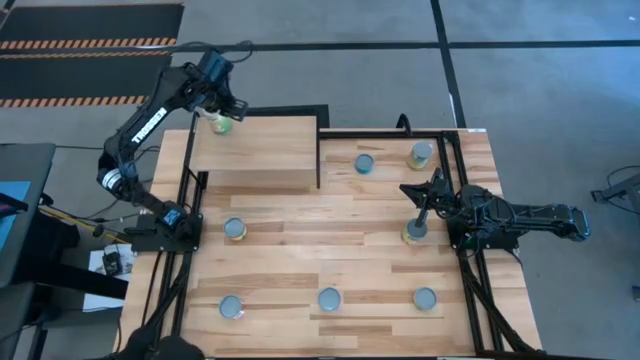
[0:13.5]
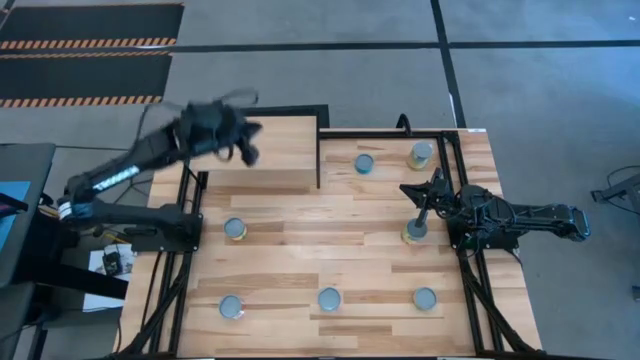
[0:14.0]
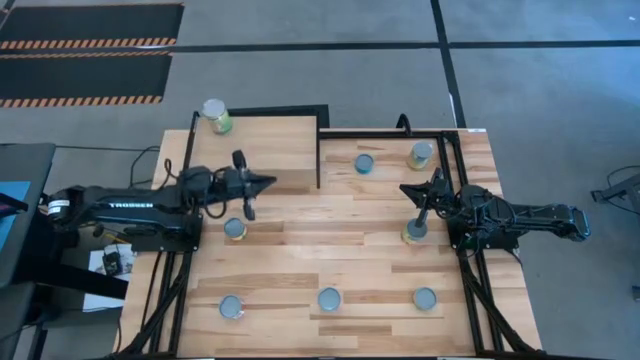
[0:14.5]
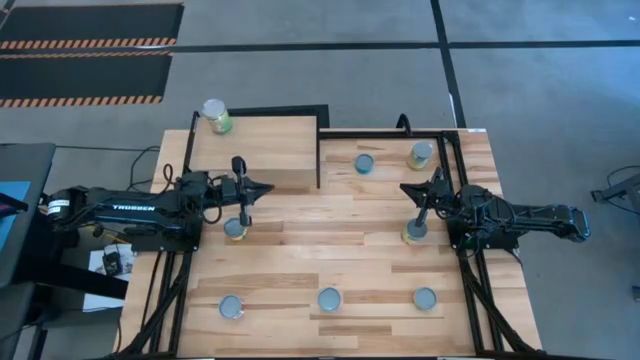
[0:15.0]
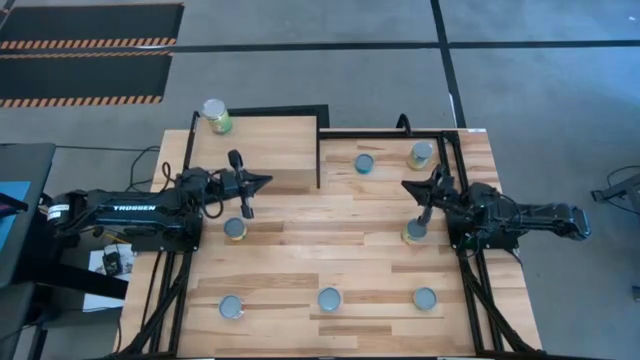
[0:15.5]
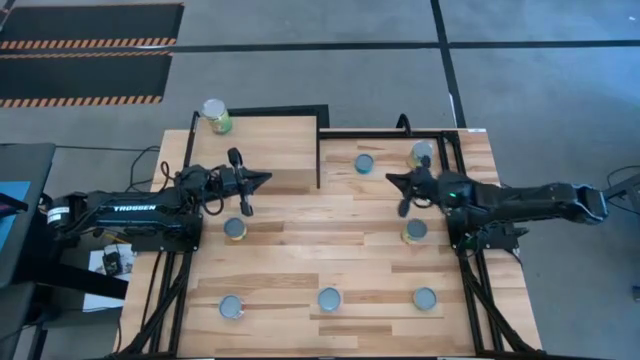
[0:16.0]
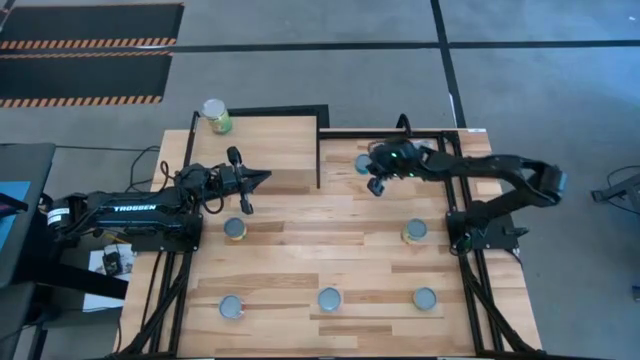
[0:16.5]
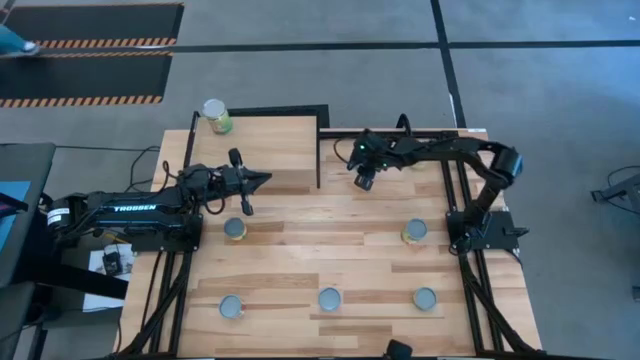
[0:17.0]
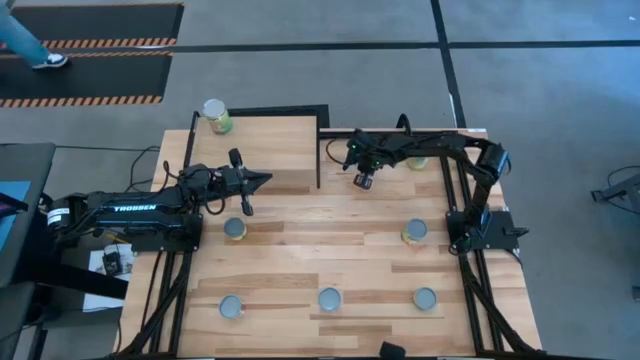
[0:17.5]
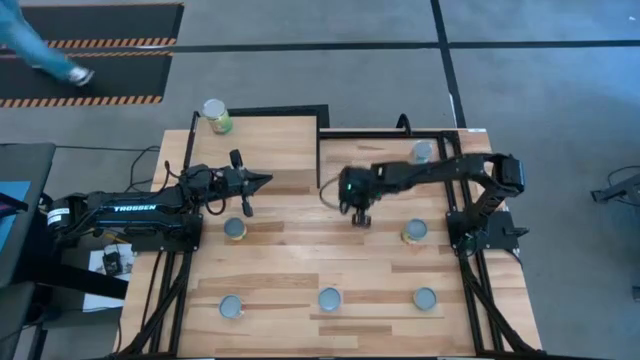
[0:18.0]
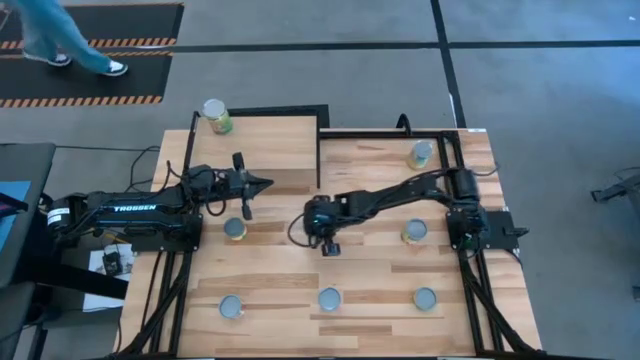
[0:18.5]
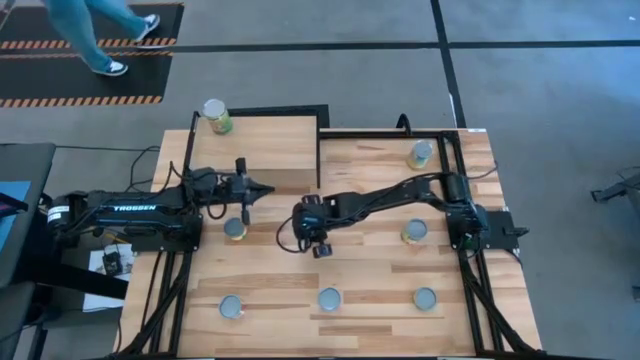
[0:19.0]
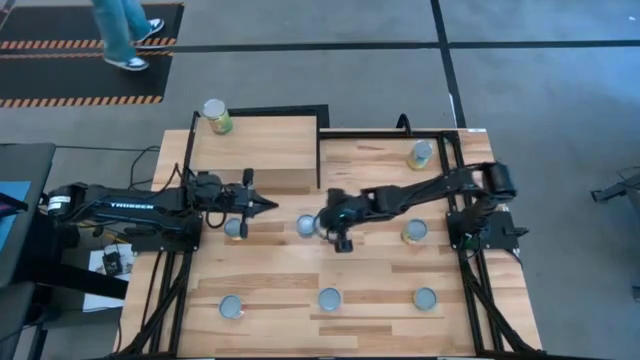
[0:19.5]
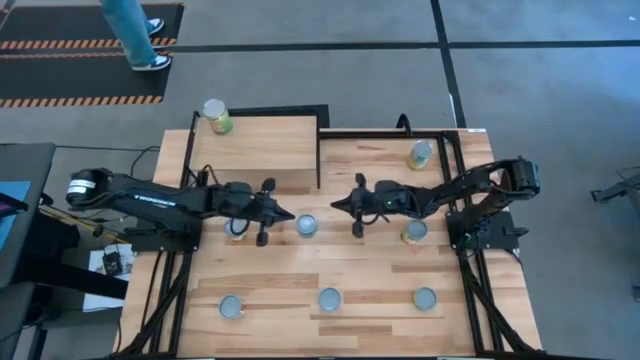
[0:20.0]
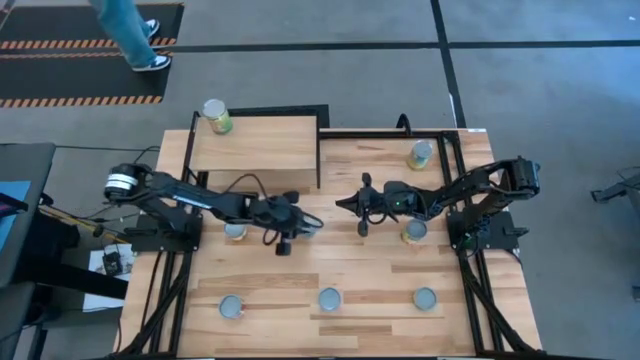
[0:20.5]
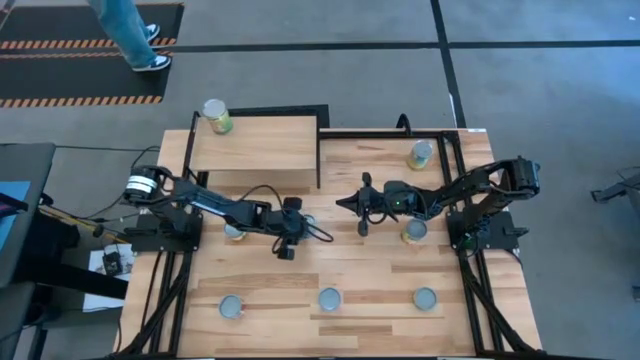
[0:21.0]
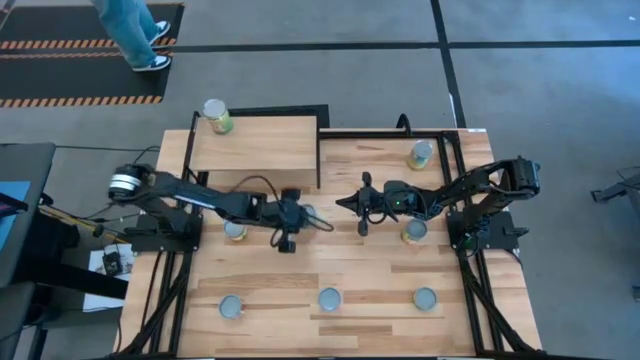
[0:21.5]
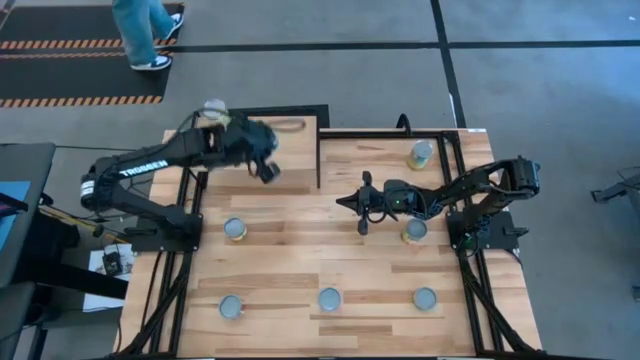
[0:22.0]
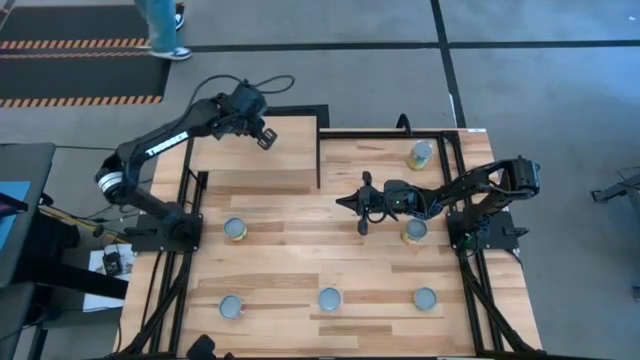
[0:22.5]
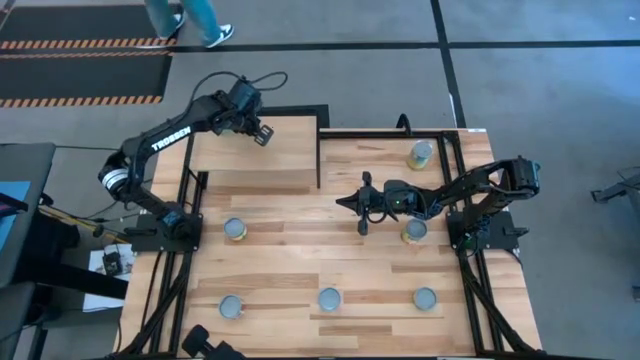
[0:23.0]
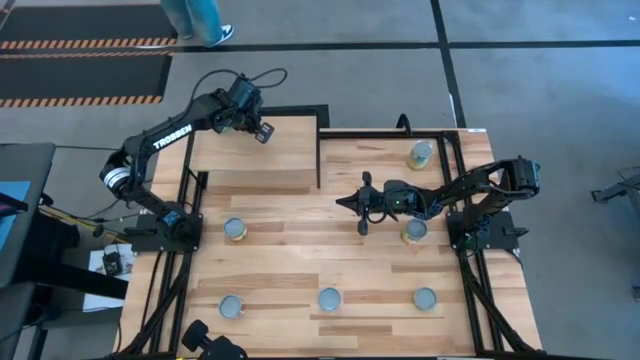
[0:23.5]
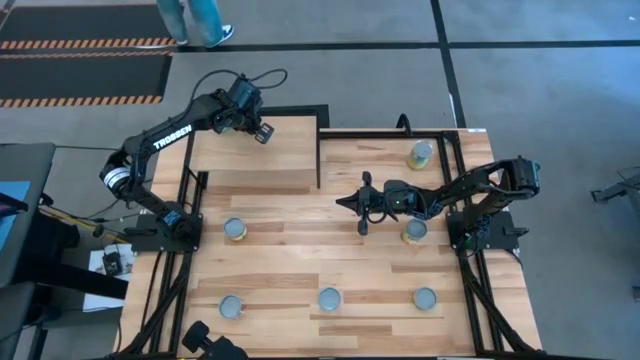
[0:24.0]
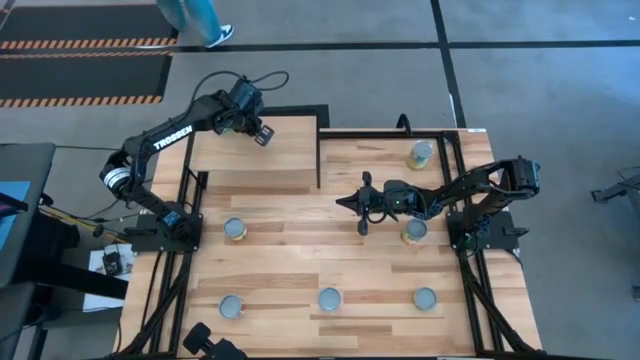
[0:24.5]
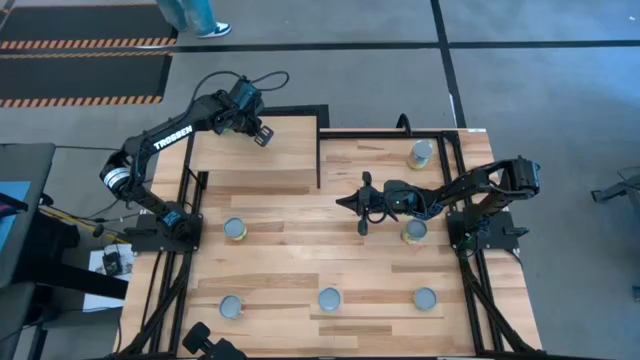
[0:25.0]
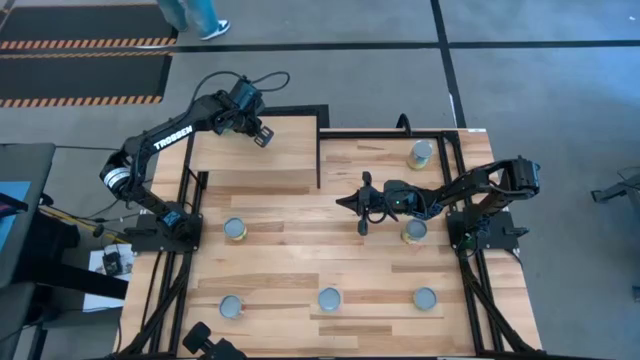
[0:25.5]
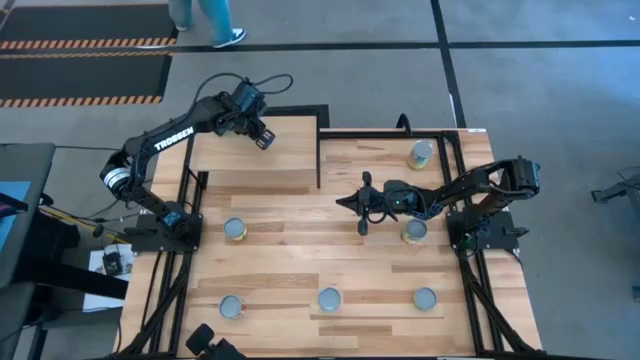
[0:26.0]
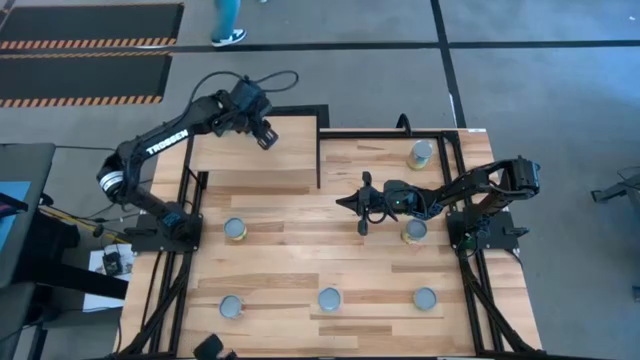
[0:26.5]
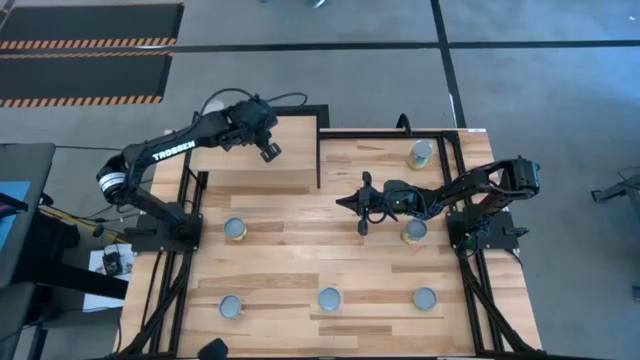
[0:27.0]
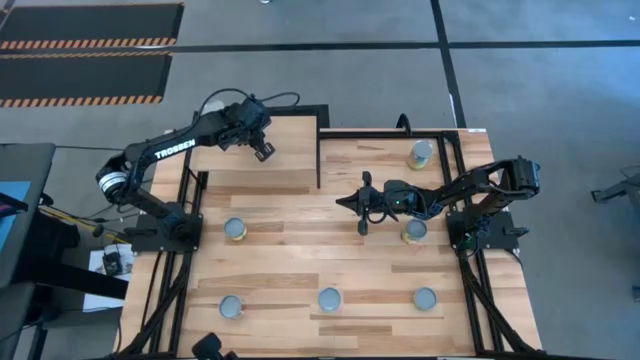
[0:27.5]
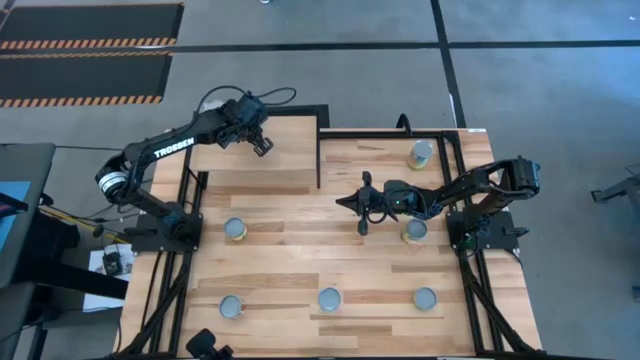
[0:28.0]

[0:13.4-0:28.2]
Task: Pick and place cans onto a shelf
Put the canned tuna on the shelf

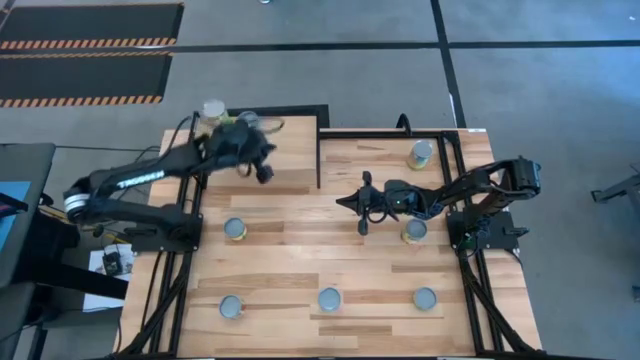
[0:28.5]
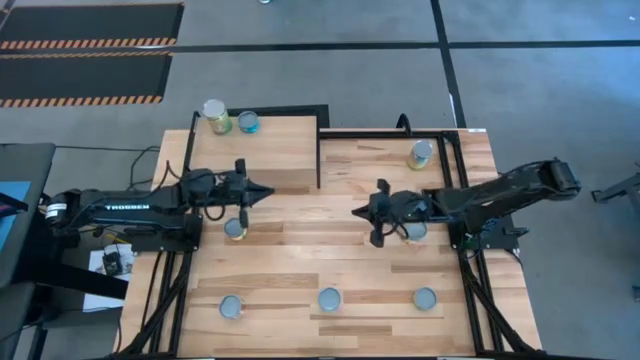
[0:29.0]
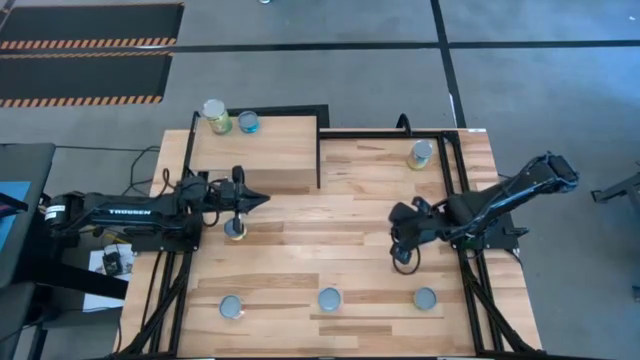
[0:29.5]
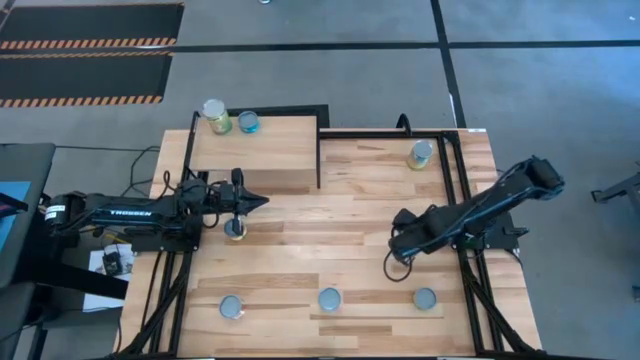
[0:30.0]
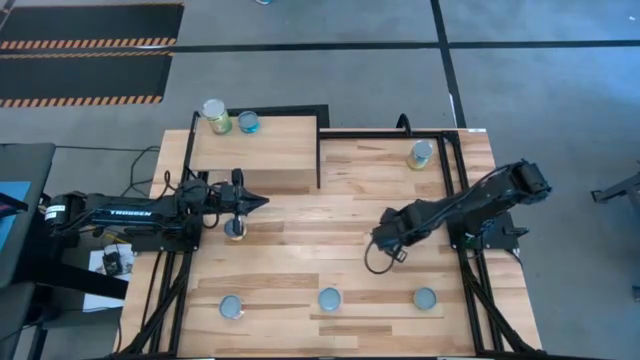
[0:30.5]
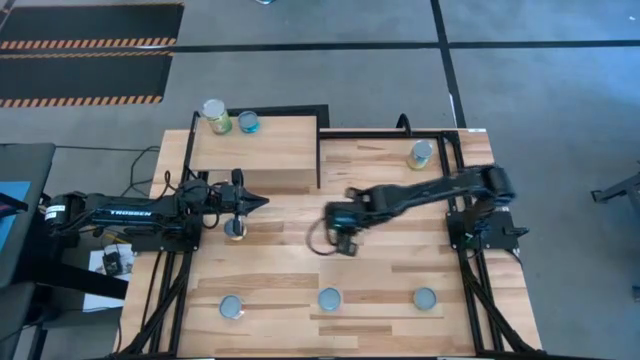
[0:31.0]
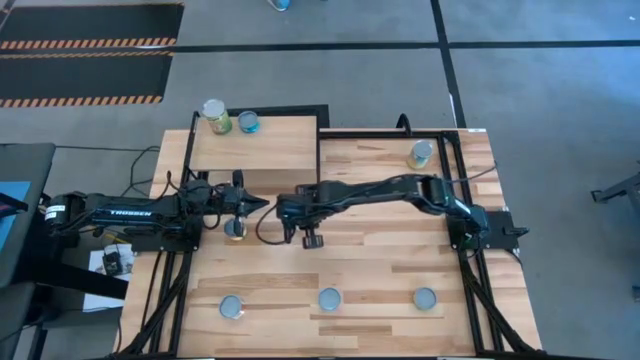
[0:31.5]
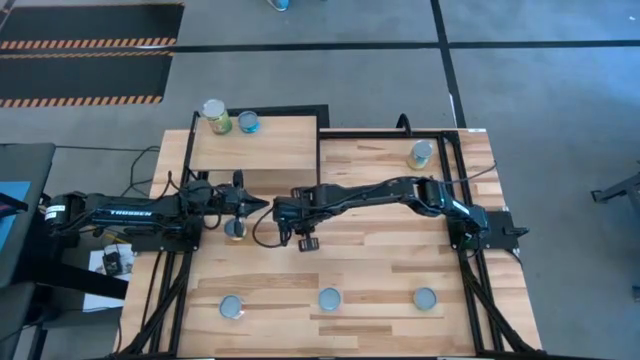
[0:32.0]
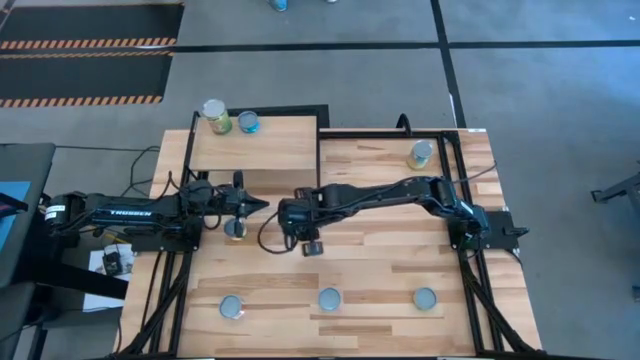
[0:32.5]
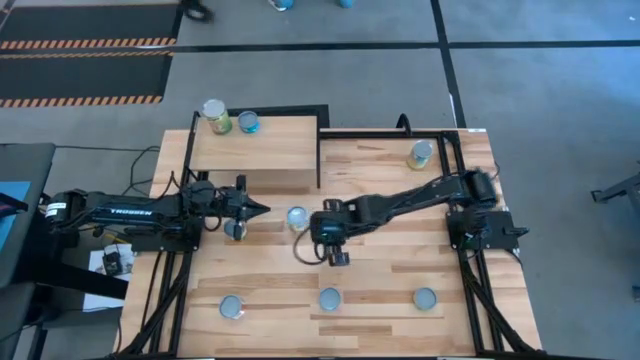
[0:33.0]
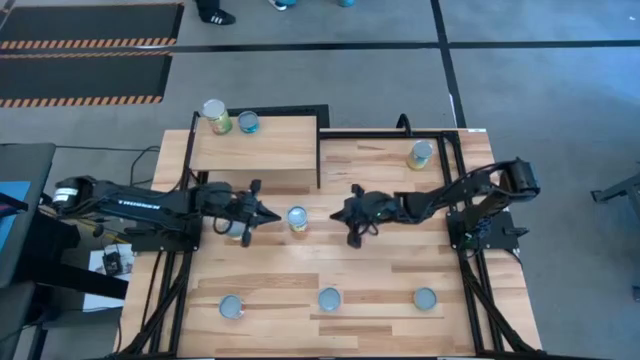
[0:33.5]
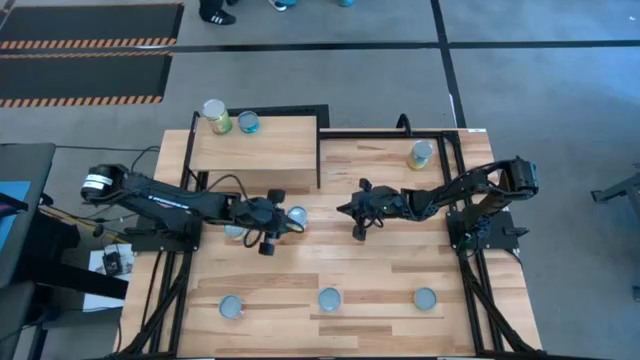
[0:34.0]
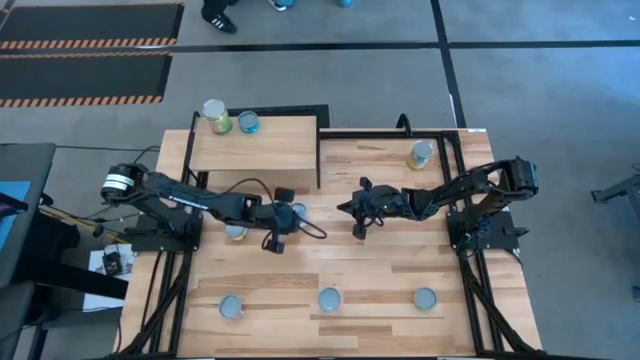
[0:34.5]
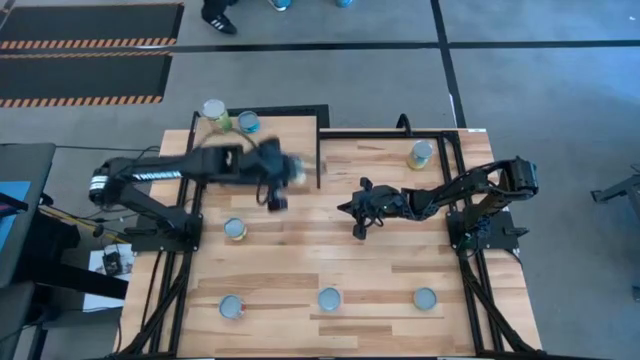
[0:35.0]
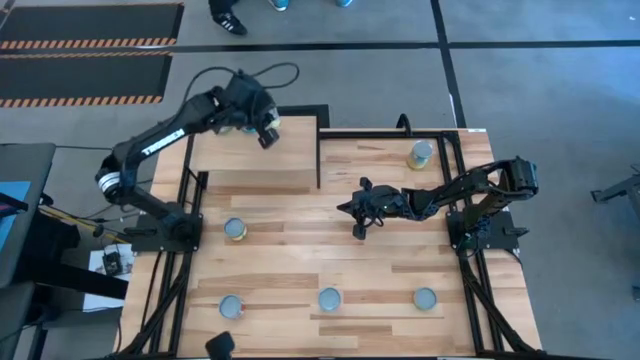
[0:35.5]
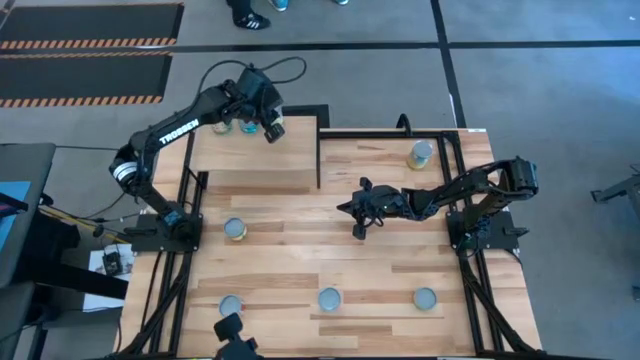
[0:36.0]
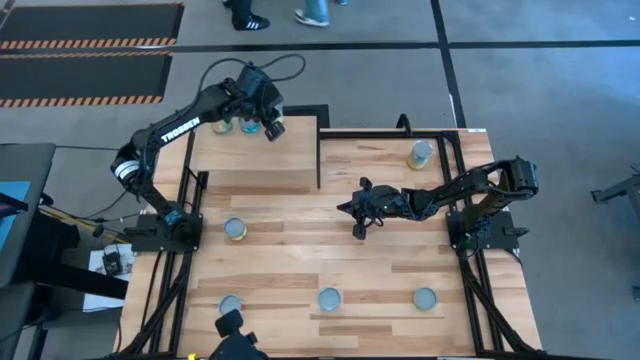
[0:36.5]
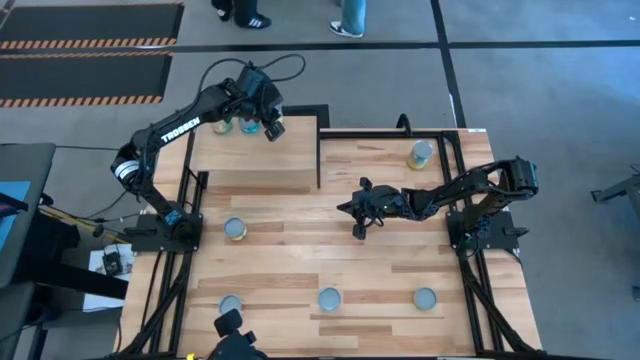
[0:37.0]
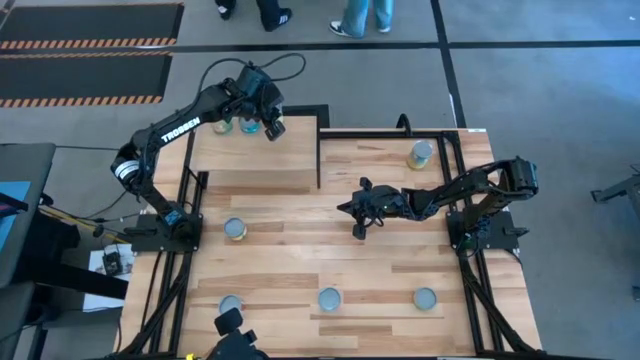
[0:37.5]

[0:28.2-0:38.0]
Put the canned spaghetti sauce on the shelf
